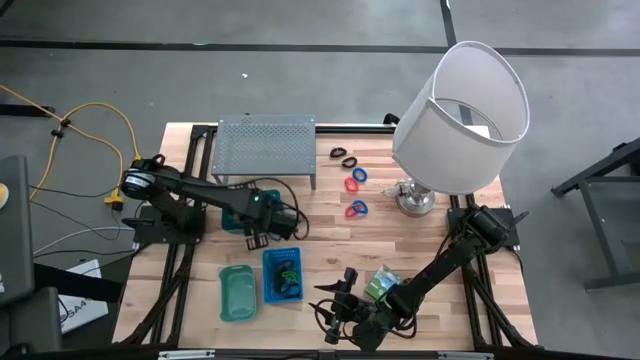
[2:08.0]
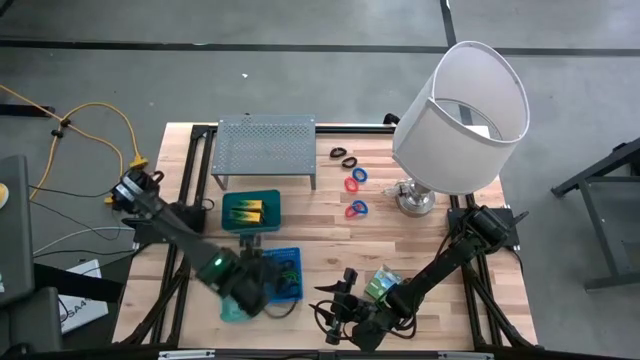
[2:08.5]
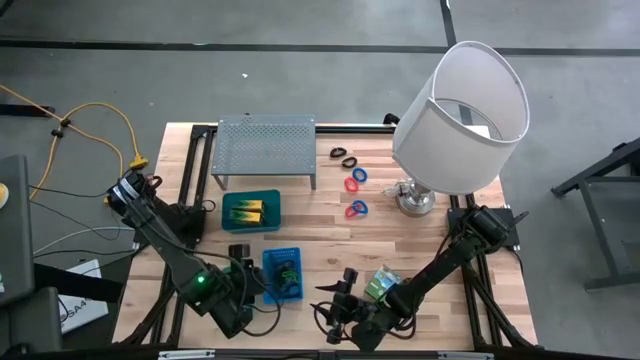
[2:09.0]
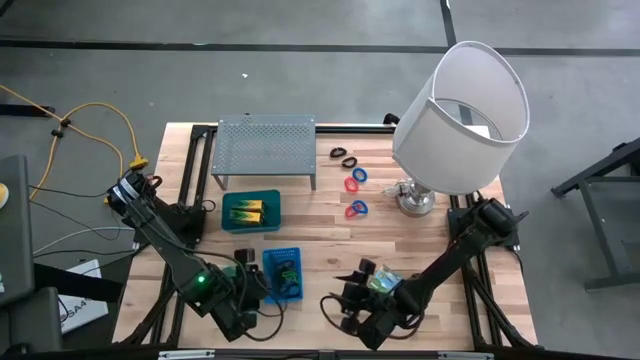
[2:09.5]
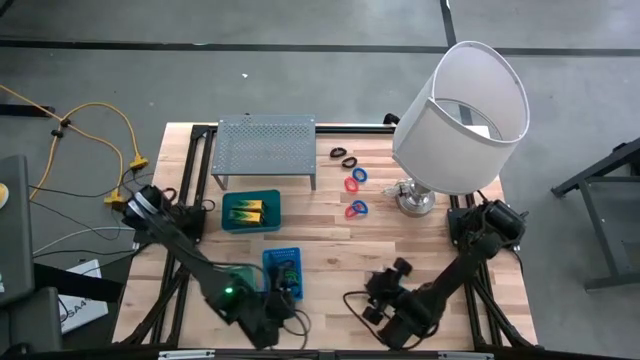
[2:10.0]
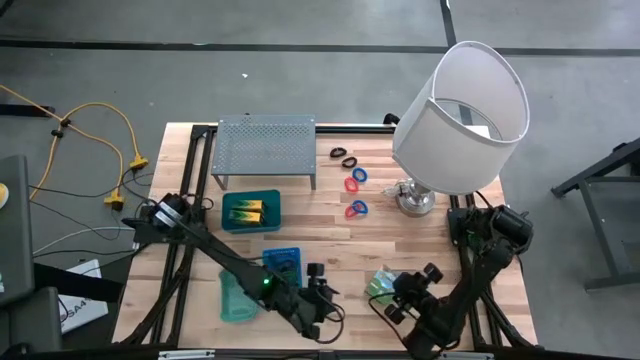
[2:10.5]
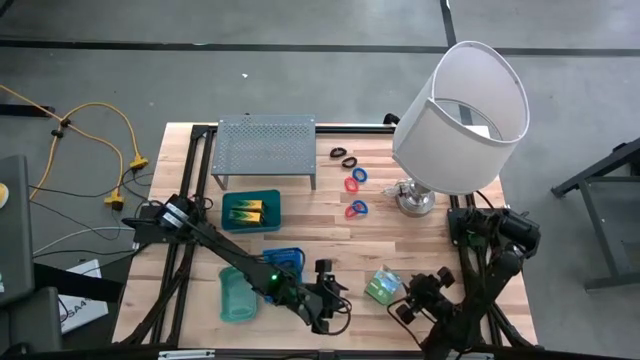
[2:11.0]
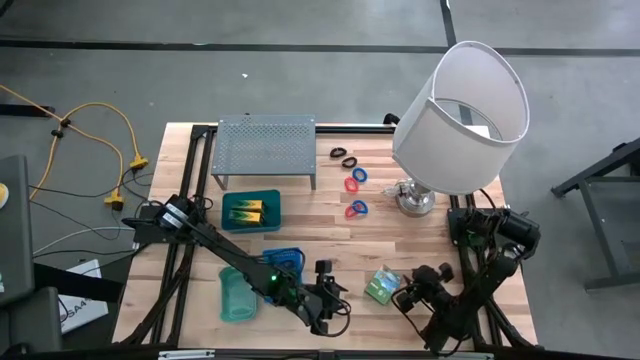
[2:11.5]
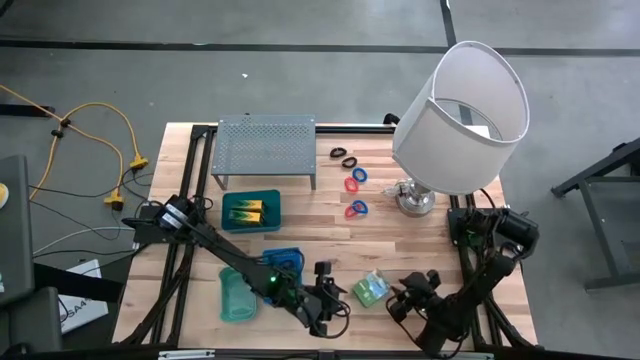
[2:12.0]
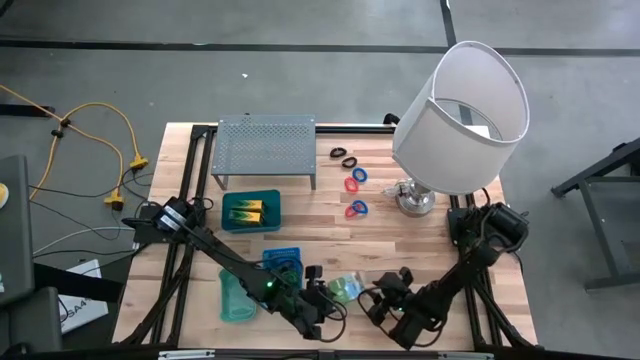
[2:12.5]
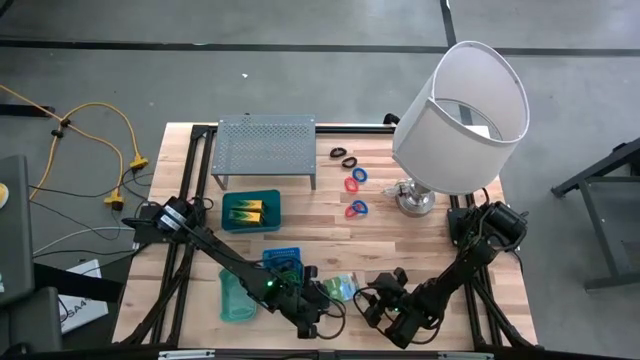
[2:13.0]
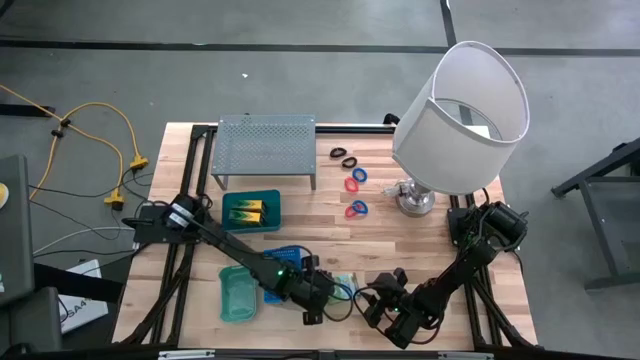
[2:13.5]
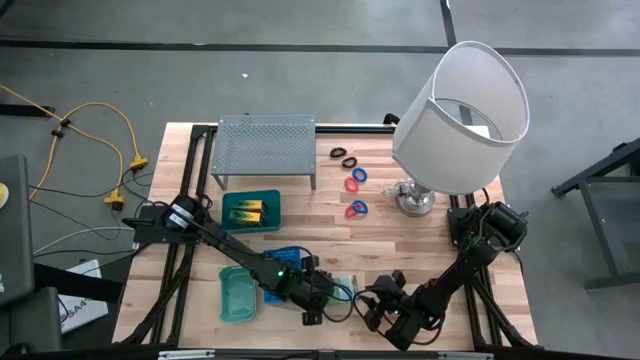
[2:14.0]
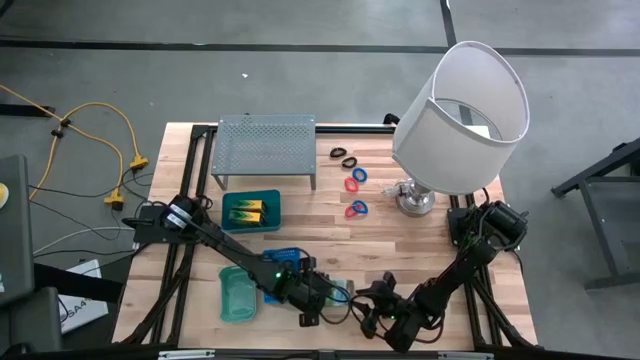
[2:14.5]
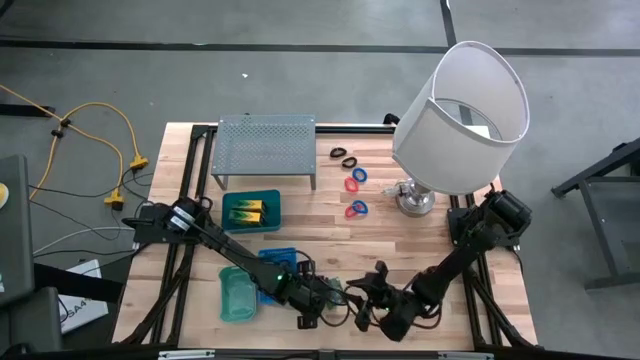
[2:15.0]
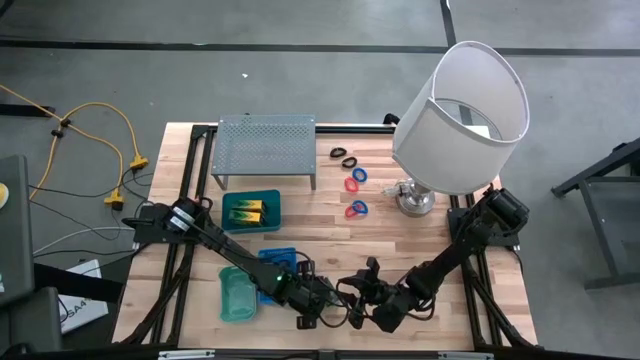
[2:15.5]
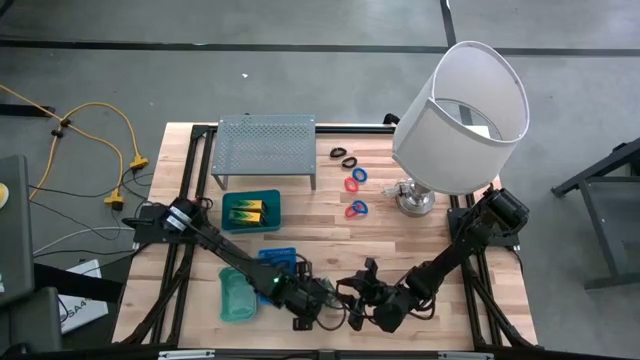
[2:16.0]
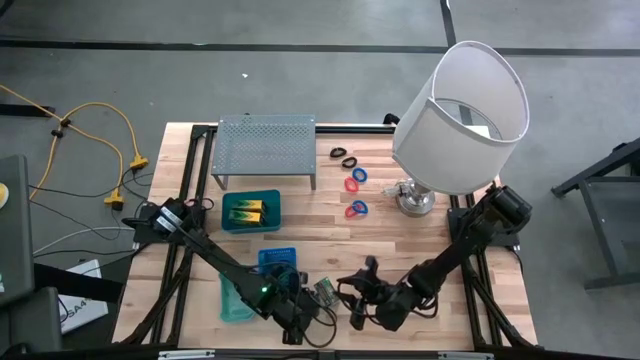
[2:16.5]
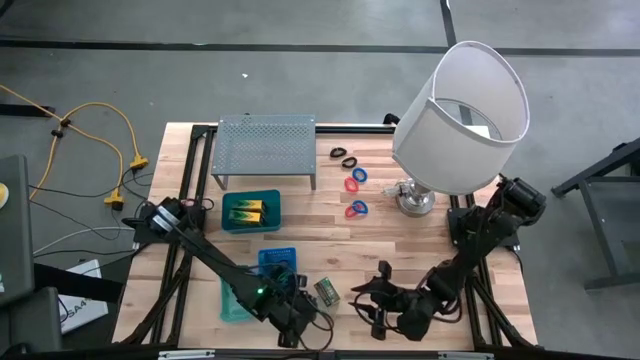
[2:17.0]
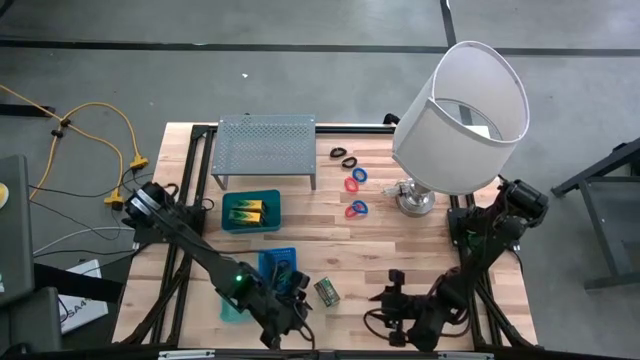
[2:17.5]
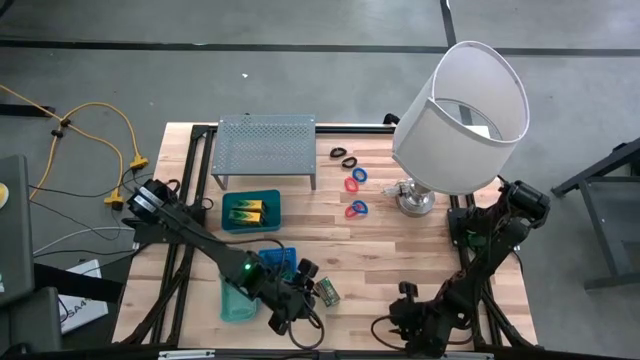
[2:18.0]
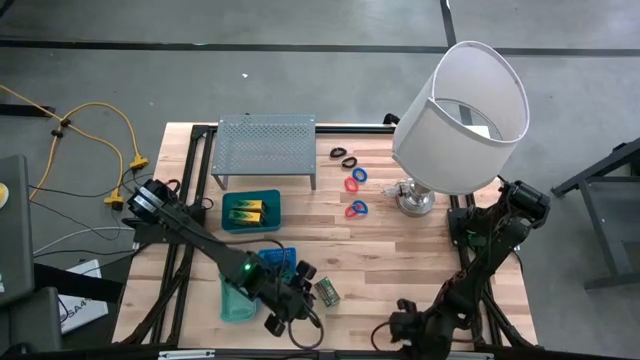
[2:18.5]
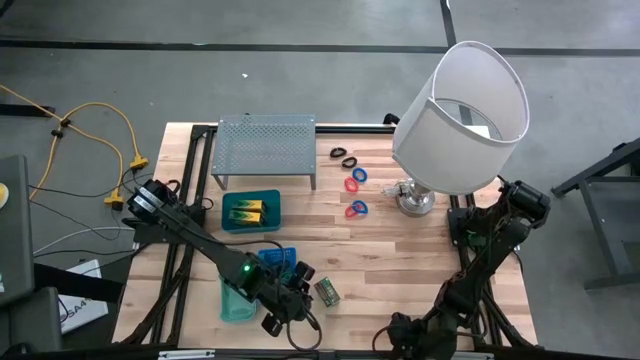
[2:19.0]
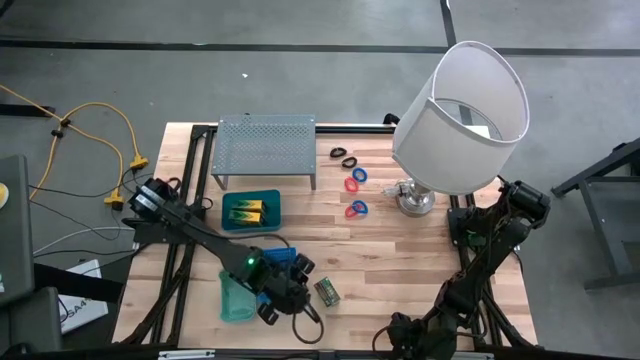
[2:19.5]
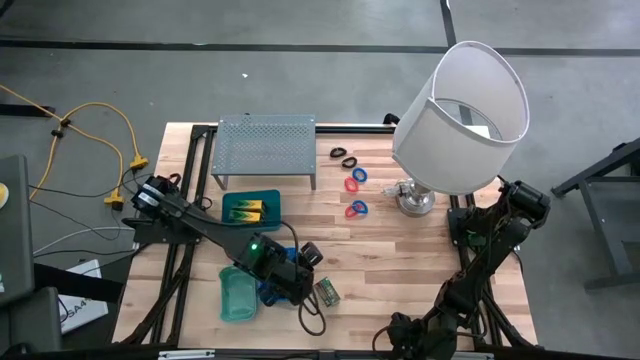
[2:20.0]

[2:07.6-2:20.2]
Task: Pick & Place Office Desk Supplies
Put the crayon box into the top blue bin

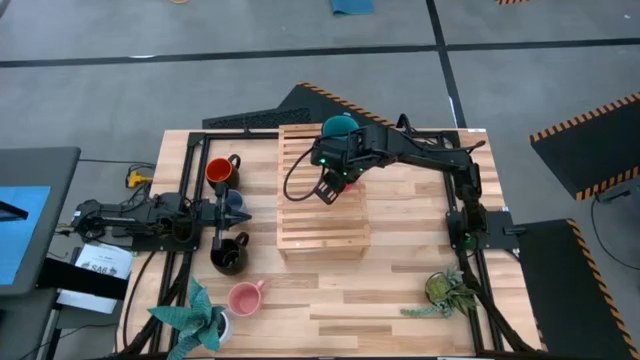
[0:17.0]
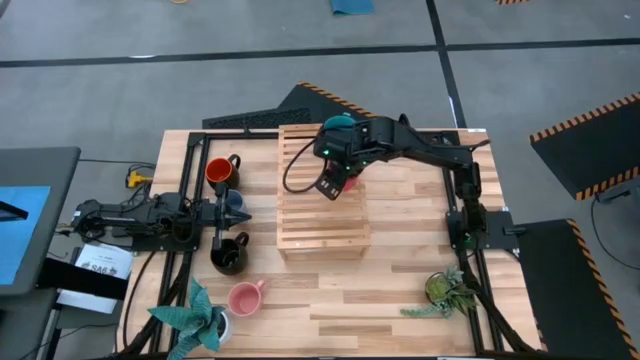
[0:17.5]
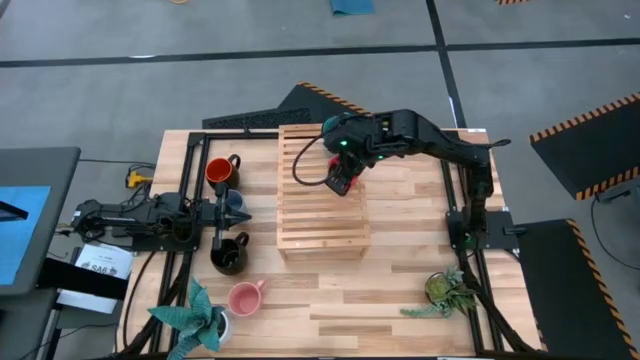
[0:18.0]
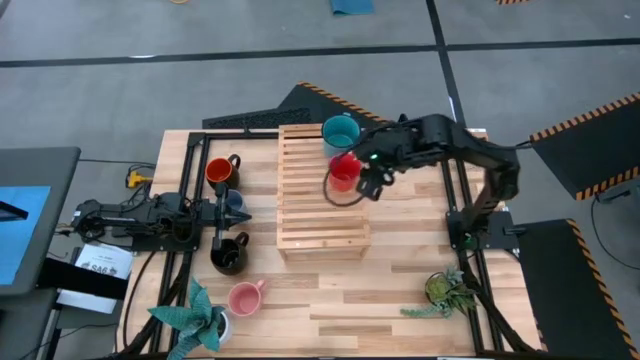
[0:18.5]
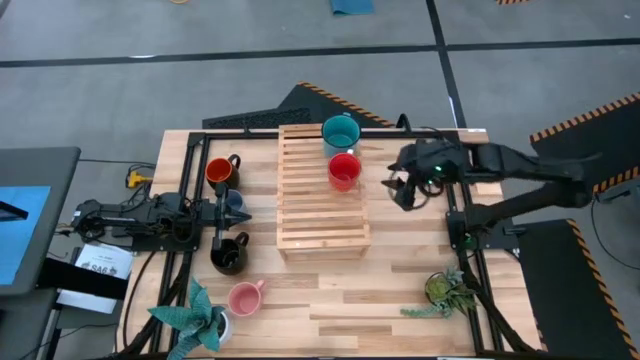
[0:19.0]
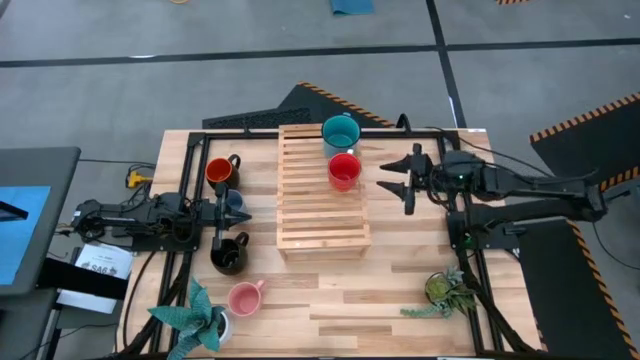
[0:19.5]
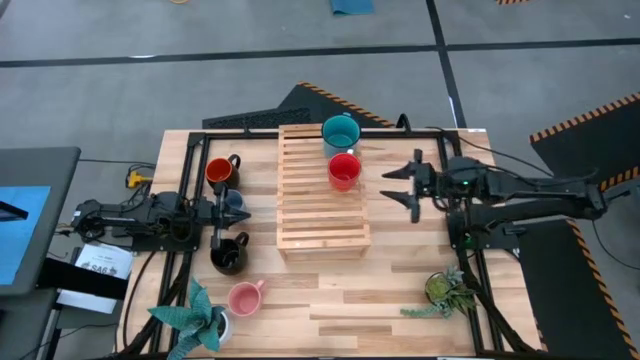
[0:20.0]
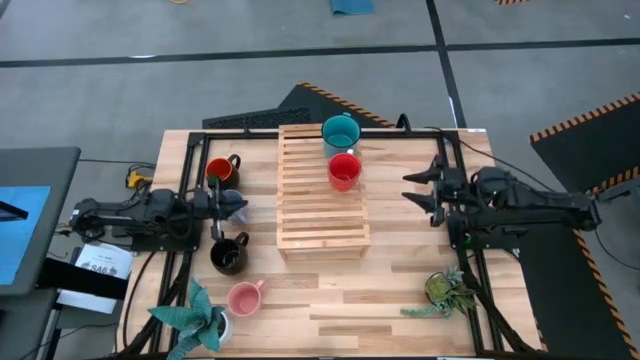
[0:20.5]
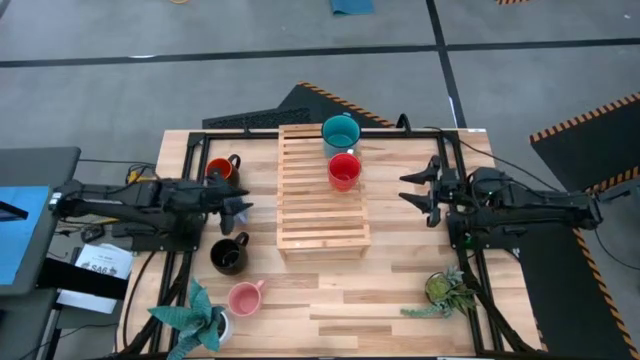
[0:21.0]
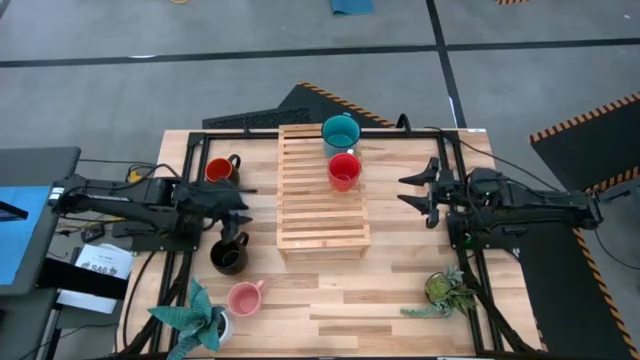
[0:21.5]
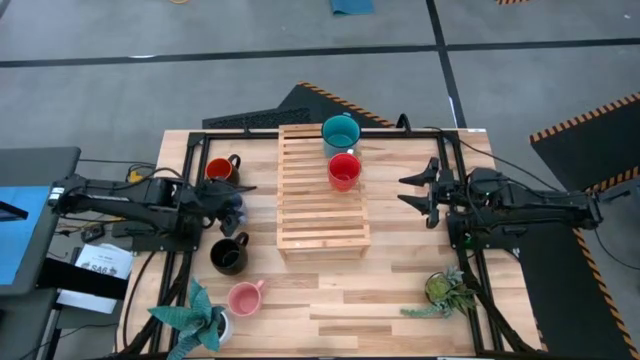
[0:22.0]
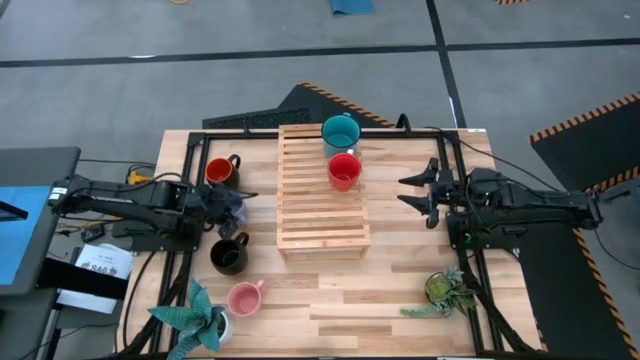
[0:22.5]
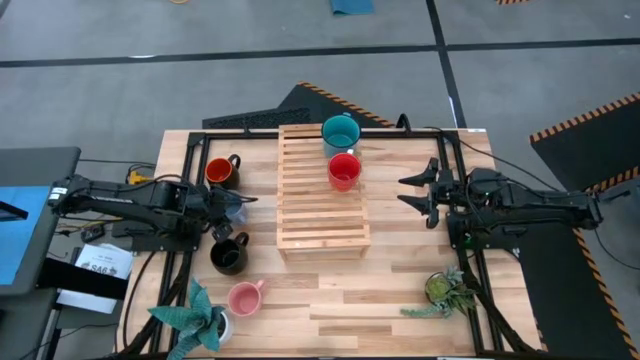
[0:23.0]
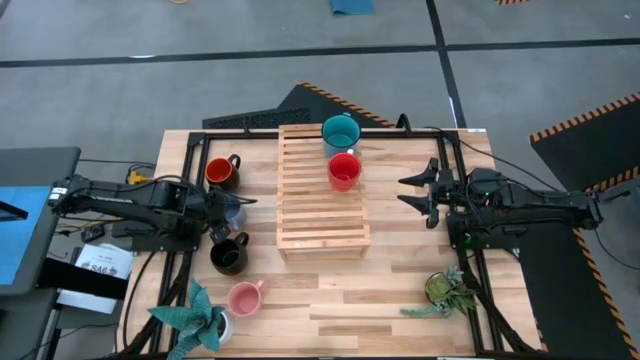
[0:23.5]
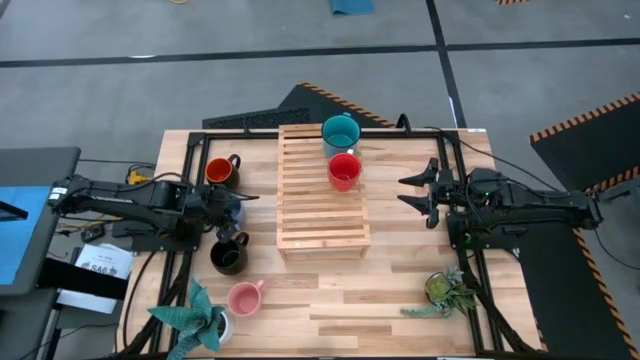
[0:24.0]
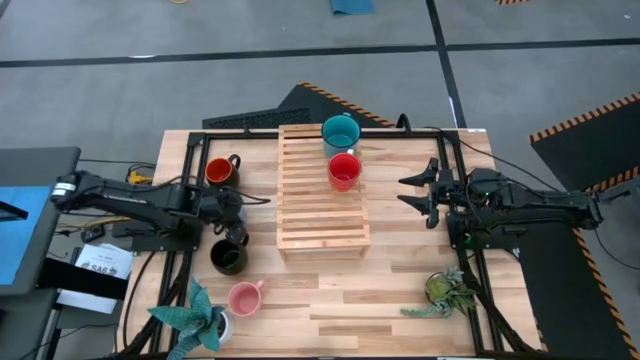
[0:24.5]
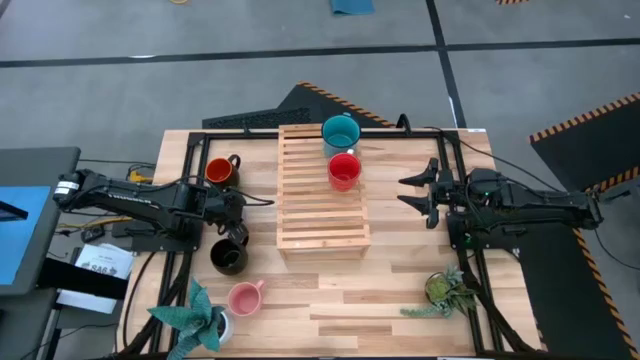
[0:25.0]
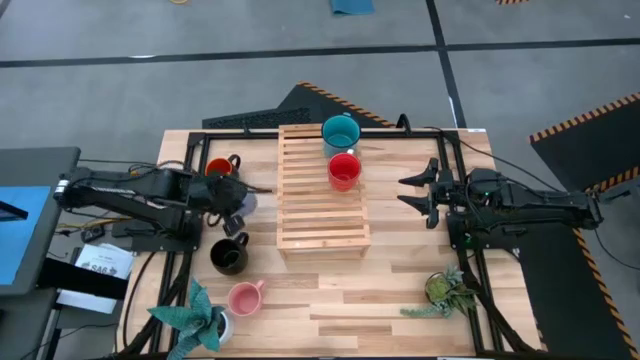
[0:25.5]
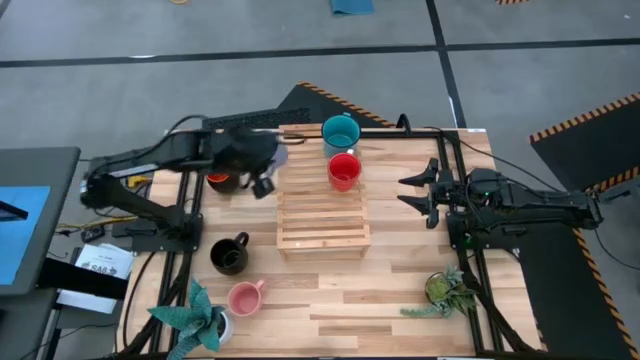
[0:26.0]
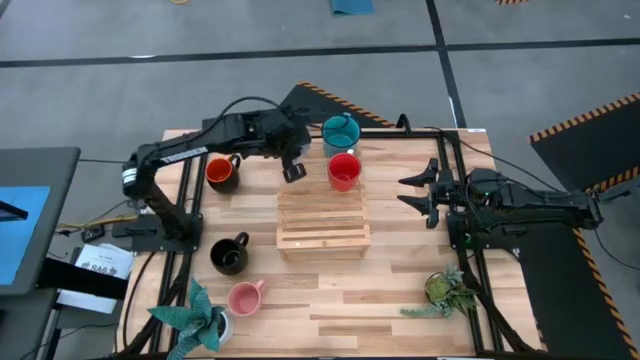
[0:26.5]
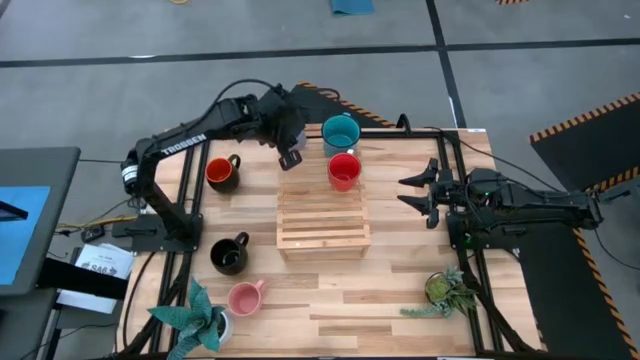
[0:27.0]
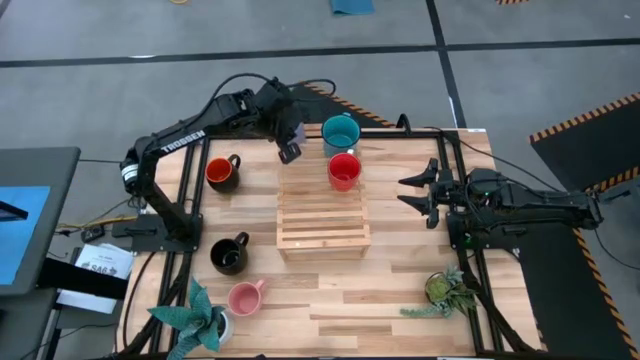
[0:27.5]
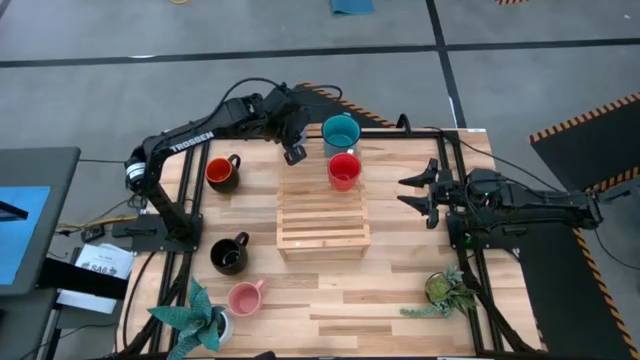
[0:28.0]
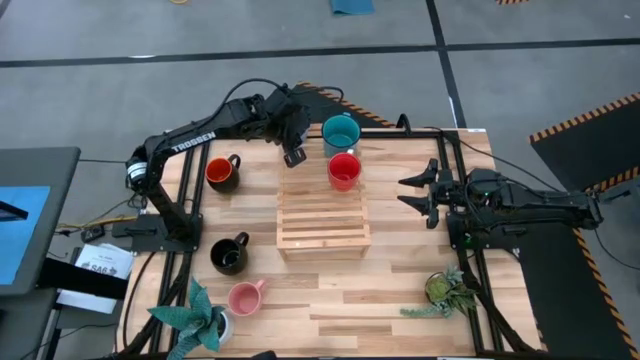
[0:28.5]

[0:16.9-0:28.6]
Task: Place coffee mugs
Put the light blue mug on the shelf
